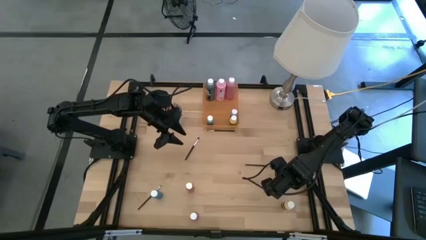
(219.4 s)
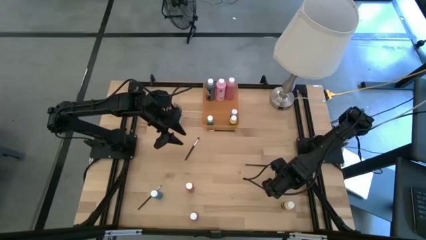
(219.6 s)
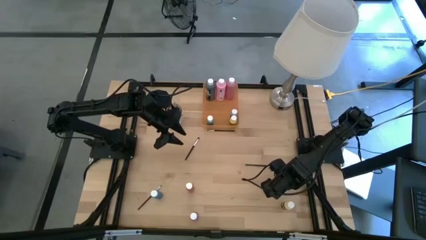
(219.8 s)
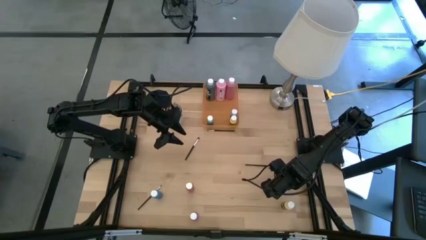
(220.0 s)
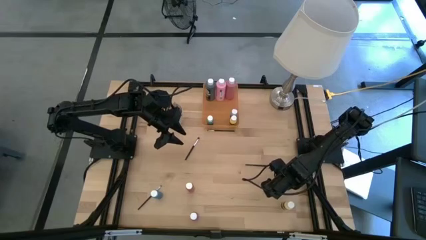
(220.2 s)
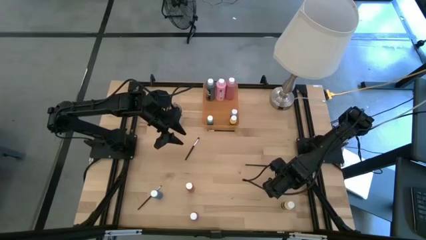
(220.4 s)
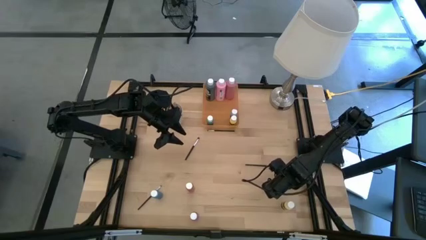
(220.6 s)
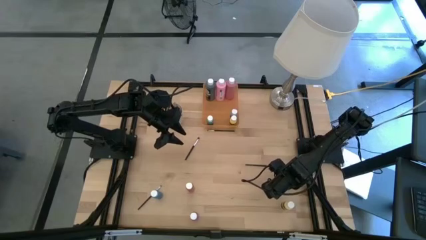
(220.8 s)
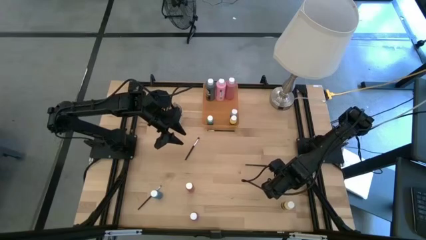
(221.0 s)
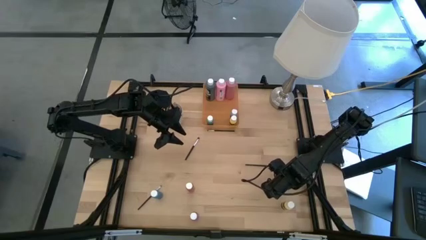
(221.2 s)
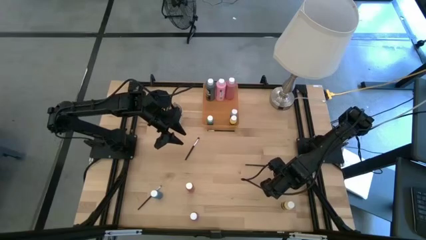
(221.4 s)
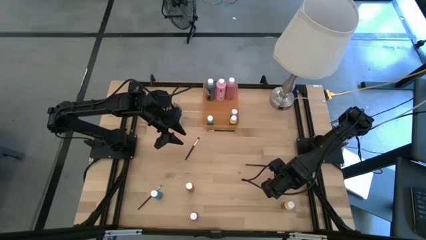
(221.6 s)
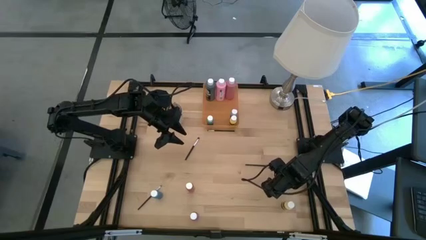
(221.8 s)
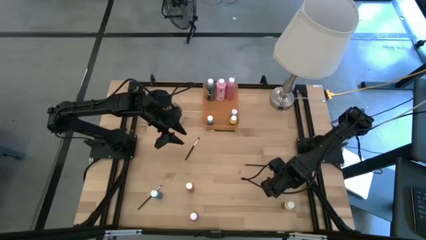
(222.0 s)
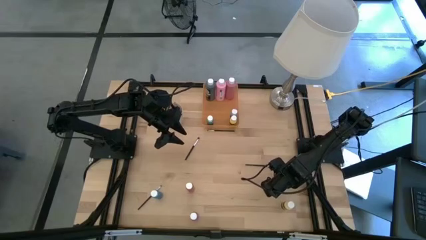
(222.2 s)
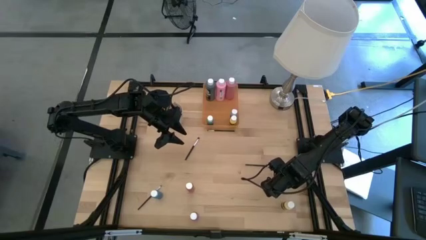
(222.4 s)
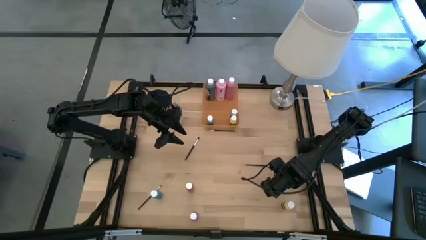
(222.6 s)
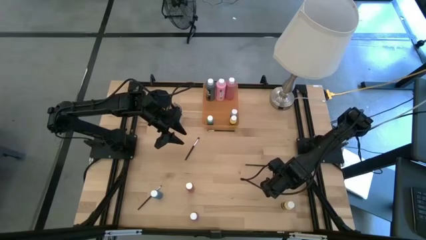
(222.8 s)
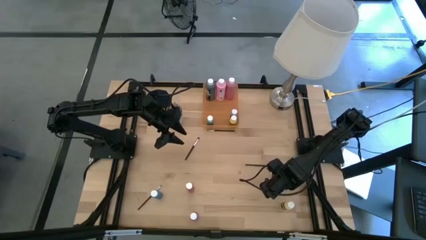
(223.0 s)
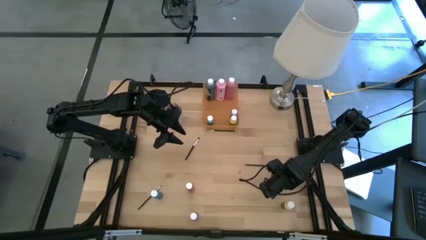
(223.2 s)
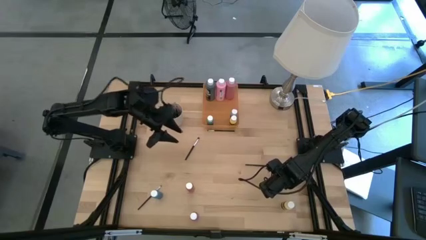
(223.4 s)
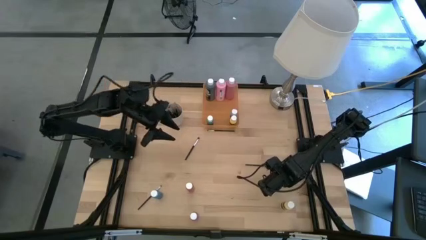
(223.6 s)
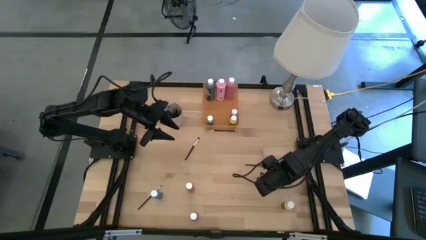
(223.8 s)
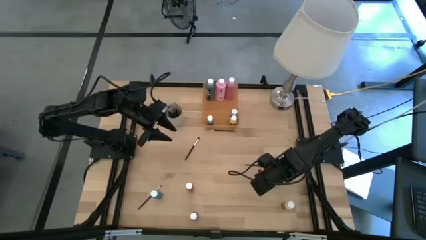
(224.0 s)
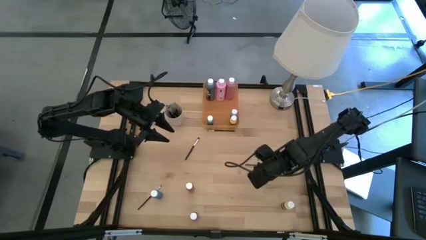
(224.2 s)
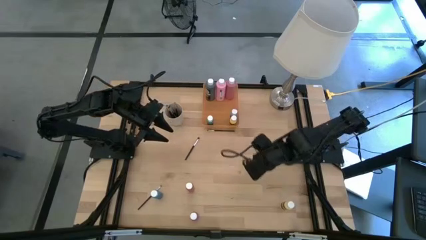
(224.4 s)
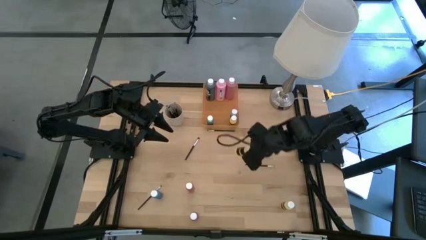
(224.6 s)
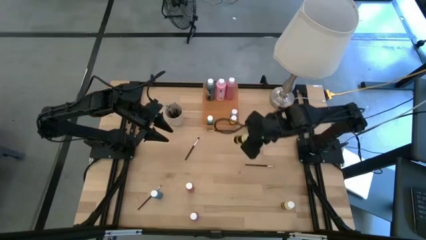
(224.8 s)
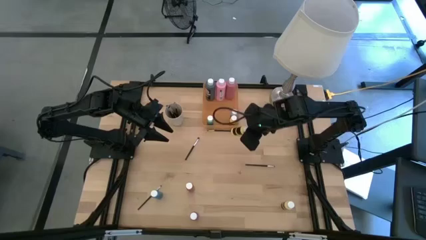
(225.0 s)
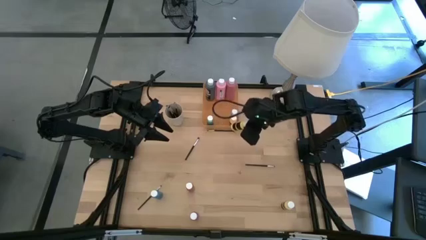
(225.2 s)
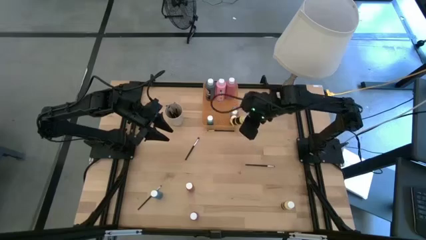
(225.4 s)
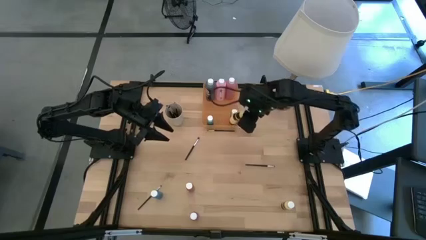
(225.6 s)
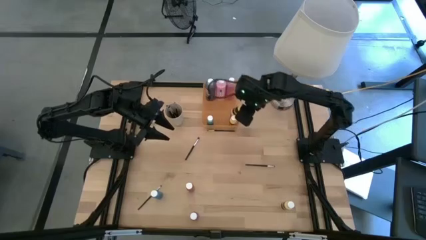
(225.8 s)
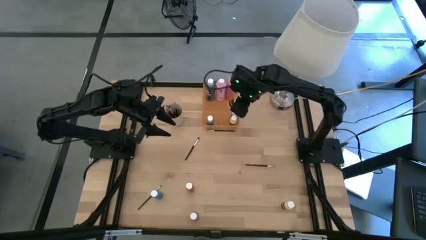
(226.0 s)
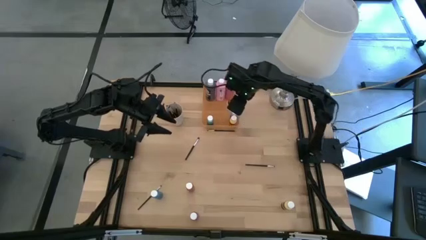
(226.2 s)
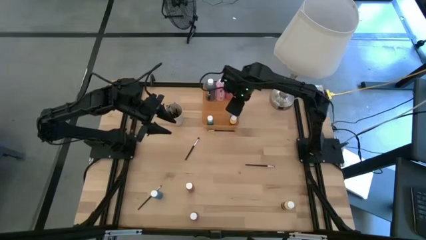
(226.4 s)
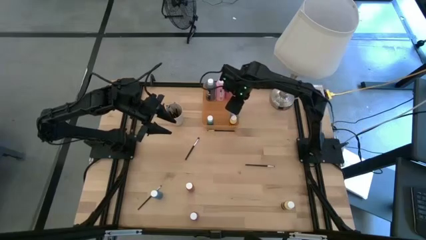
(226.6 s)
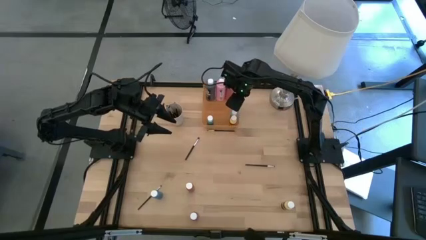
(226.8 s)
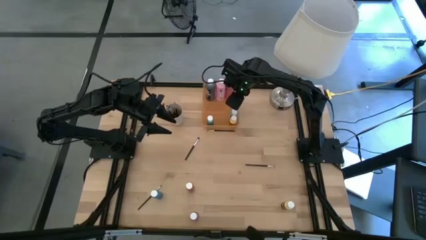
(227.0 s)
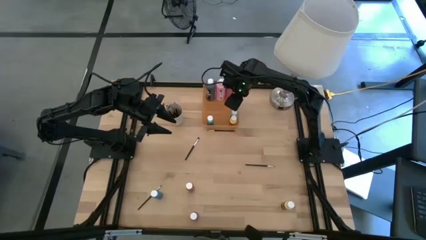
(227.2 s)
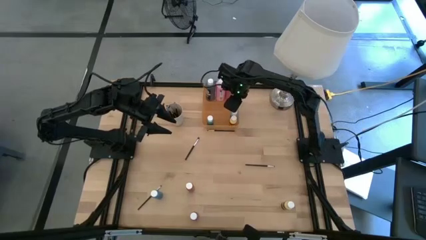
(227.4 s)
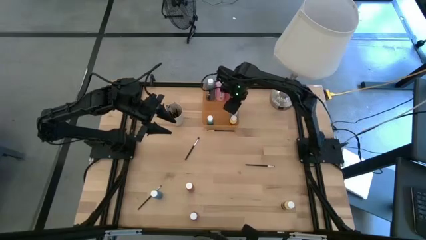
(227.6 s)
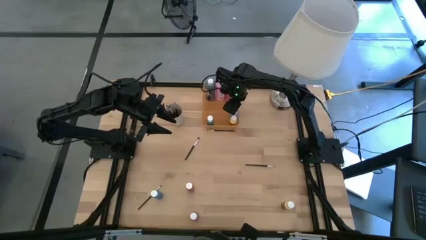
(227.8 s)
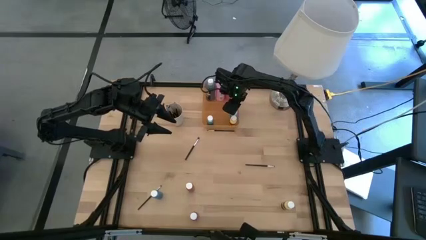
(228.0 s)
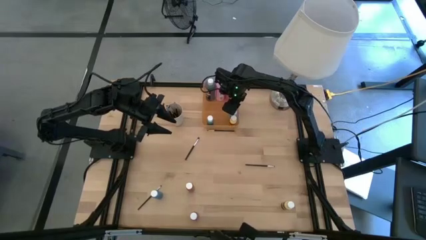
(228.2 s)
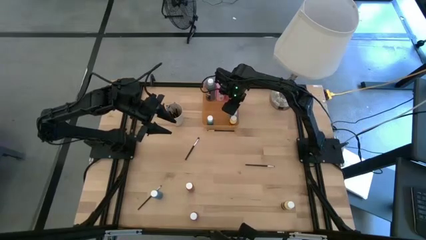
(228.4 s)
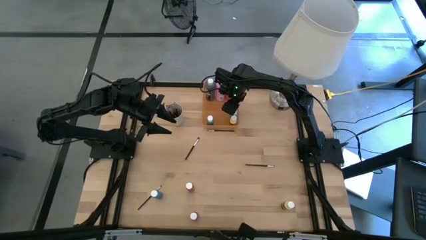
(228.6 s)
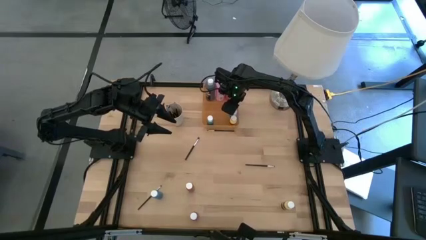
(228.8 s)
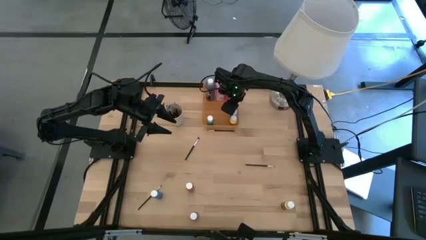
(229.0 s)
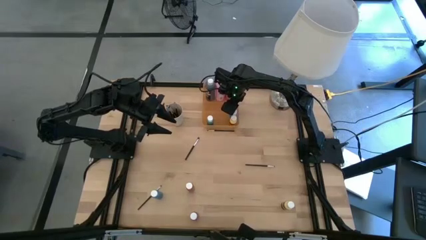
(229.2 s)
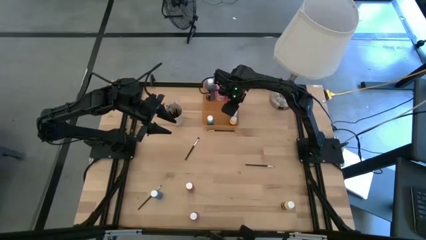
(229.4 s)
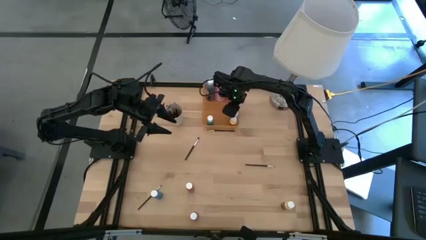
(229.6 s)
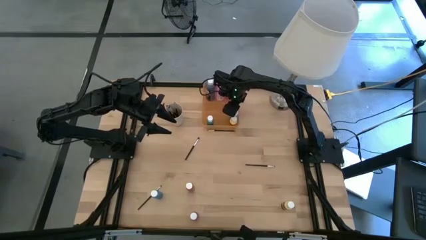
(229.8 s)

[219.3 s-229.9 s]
Task: Pick & Place Paint Supplies
Put the yellow paint bottle into the orange bin

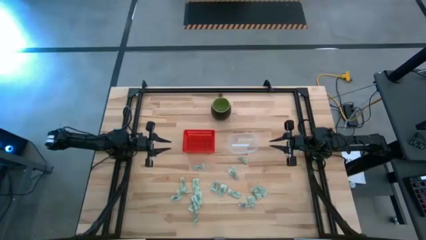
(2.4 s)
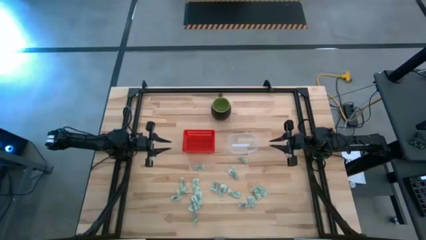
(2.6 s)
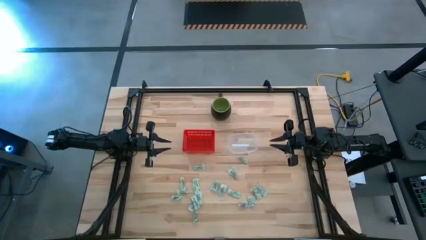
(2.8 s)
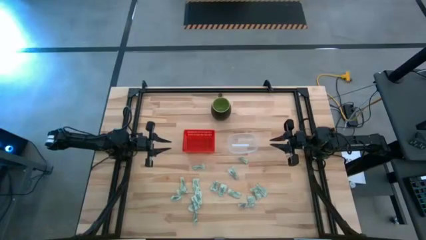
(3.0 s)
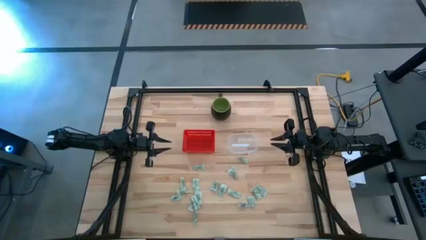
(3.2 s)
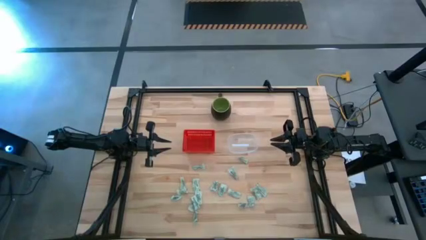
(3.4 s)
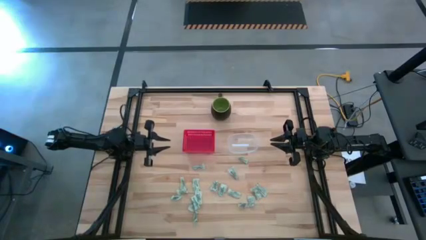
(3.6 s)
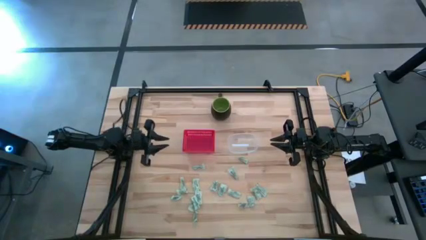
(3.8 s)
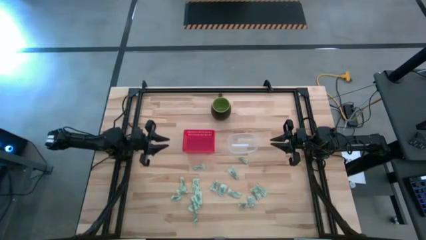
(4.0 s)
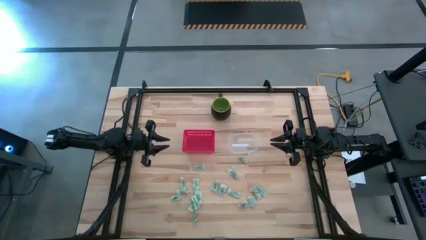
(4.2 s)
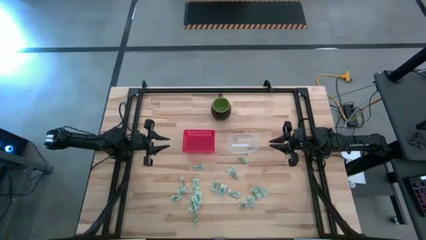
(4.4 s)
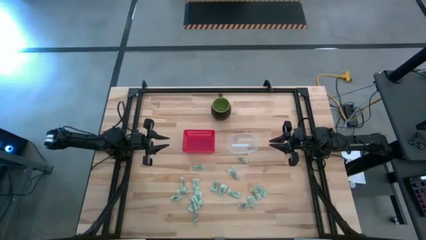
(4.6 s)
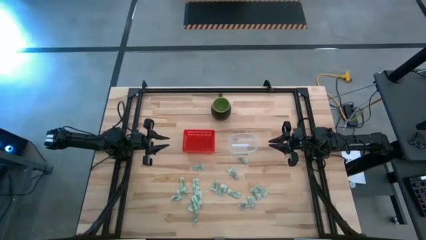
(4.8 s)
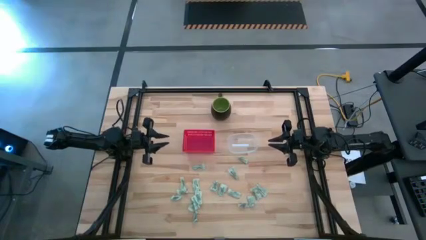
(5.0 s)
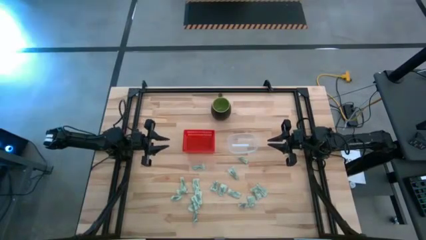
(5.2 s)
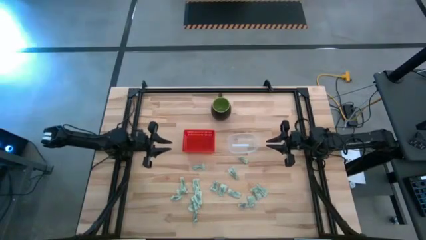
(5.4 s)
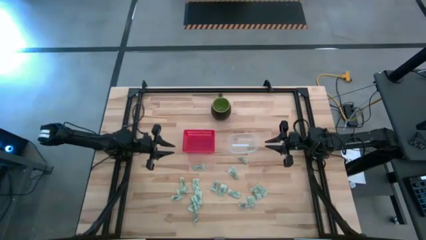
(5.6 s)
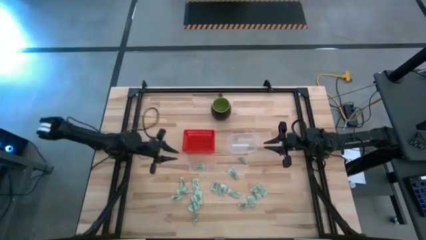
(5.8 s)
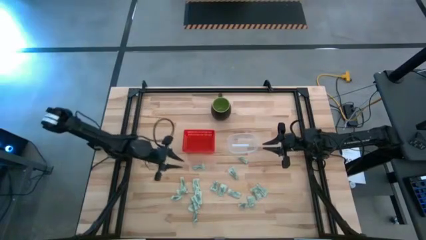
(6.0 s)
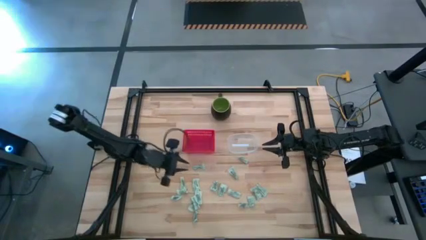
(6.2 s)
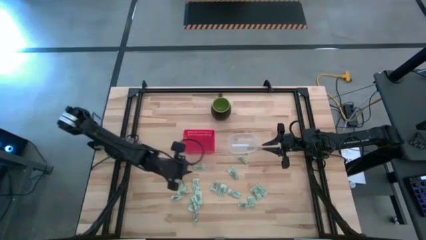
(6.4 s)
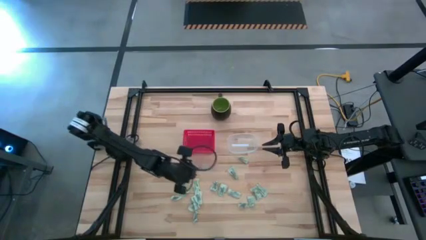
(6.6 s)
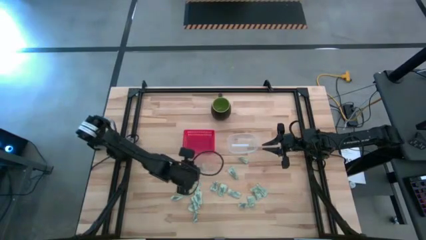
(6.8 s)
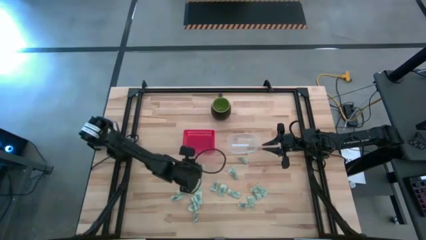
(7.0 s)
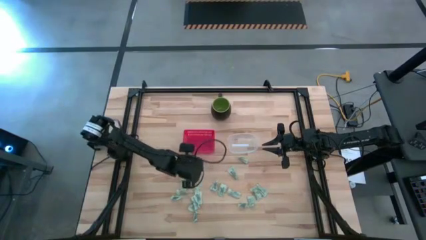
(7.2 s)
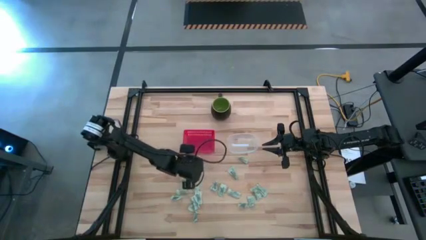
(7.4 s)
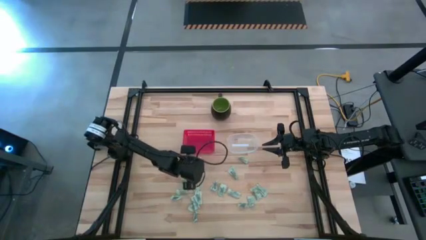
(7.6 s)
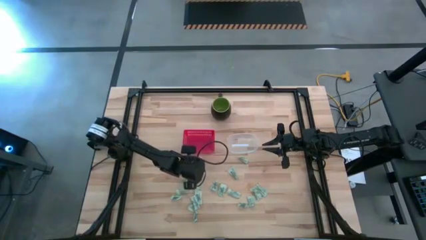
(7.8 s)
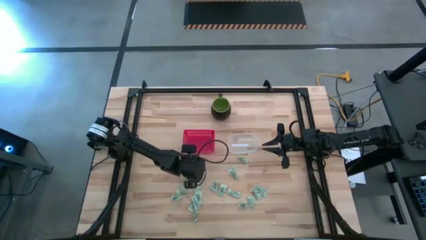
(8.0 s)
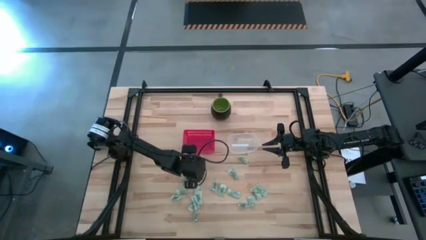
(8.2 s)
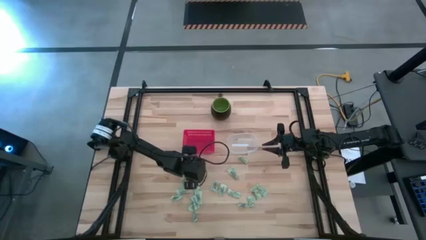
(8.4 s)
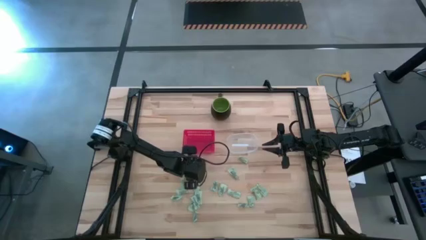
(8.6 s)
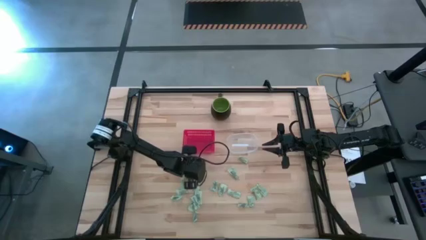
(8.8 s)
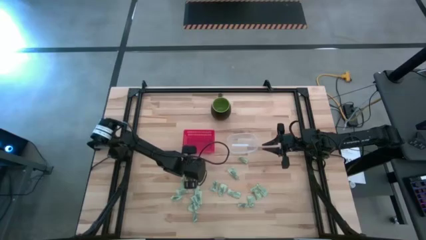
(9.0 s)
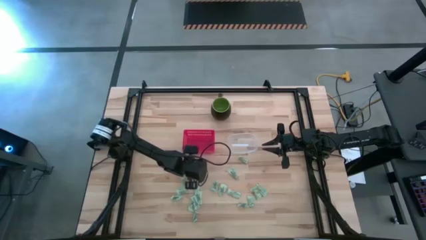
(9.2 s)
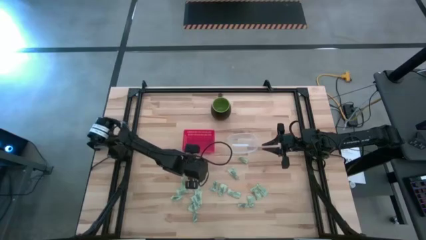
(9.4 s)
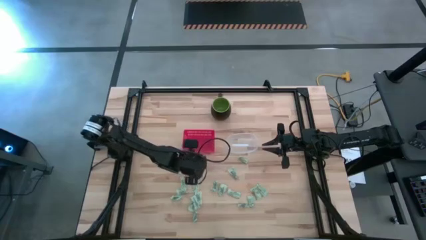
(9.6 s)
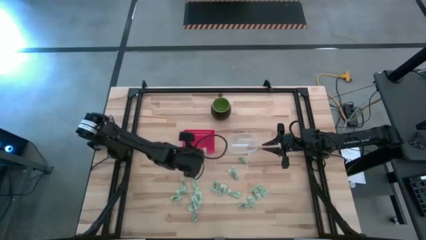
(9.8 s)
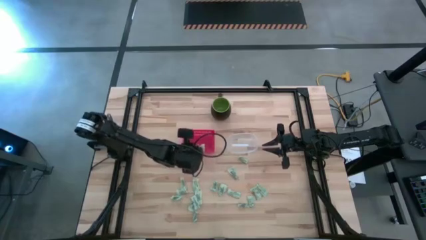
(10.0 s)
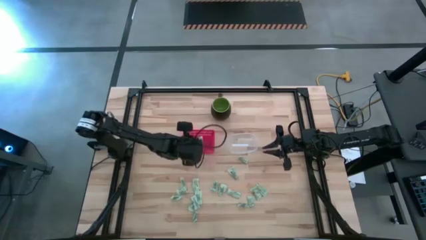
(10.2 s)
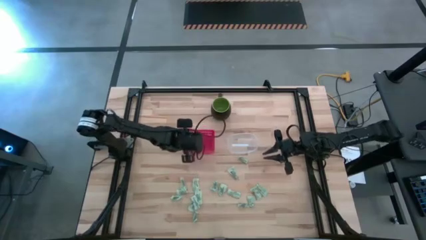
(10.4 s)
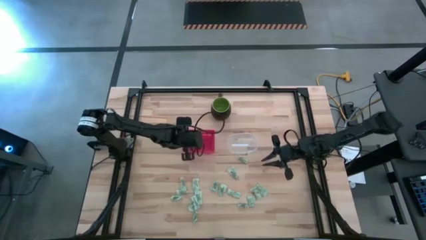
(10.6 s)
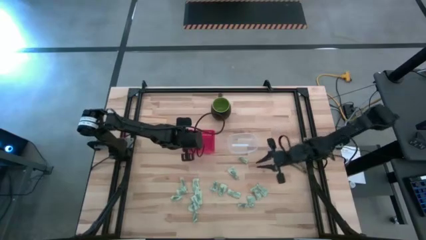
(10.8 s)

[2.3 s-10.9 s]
Task: Pick and place items into bin
Put the stevia packet into the red bin
